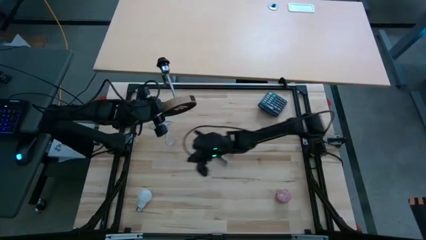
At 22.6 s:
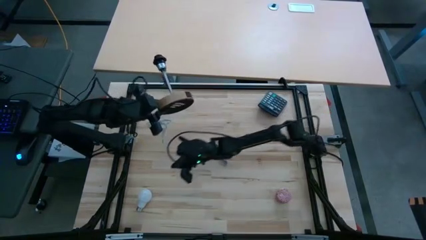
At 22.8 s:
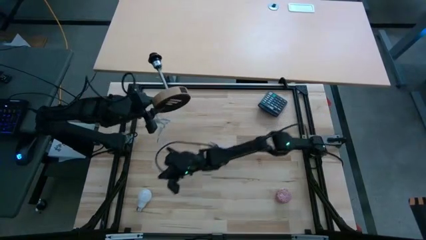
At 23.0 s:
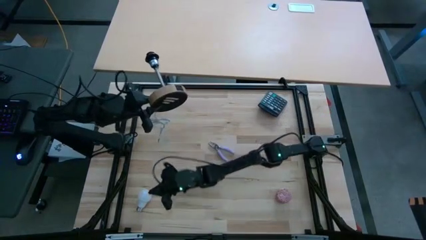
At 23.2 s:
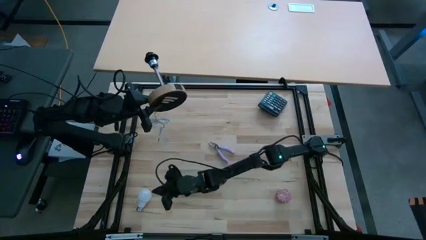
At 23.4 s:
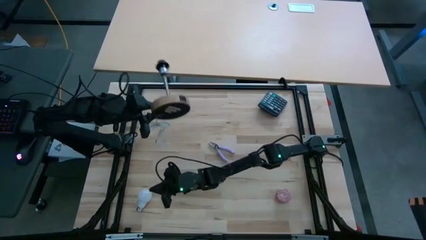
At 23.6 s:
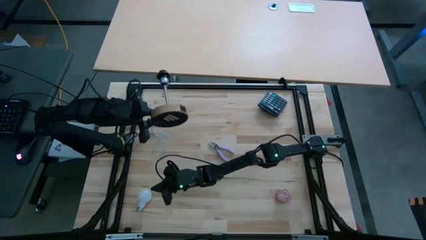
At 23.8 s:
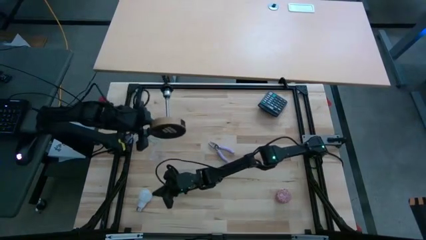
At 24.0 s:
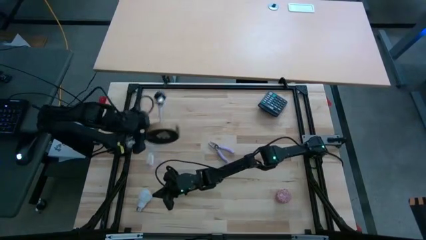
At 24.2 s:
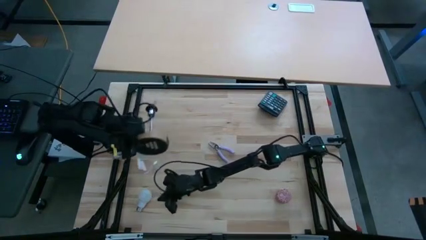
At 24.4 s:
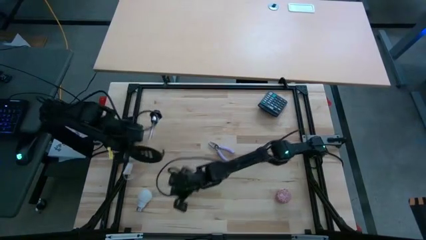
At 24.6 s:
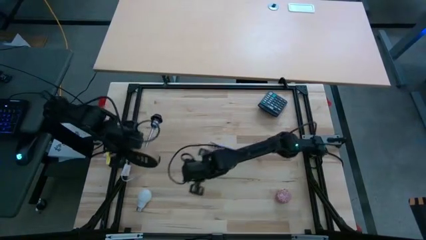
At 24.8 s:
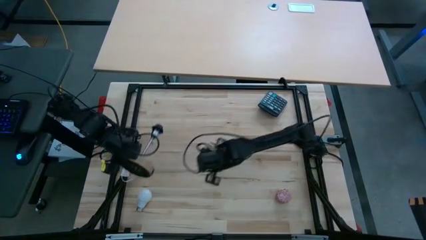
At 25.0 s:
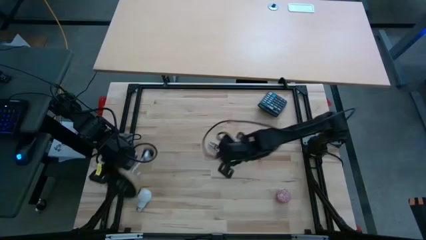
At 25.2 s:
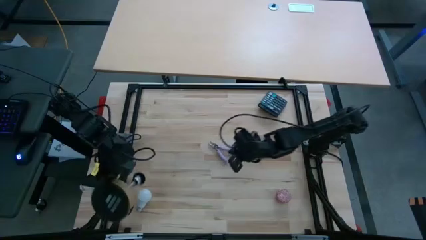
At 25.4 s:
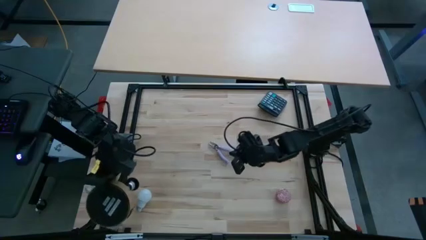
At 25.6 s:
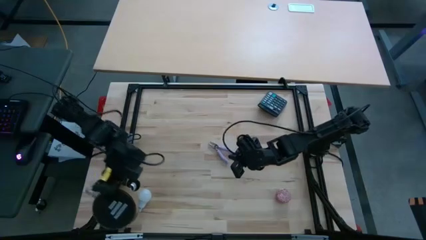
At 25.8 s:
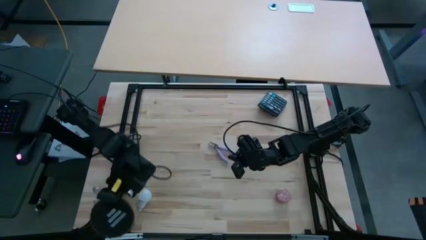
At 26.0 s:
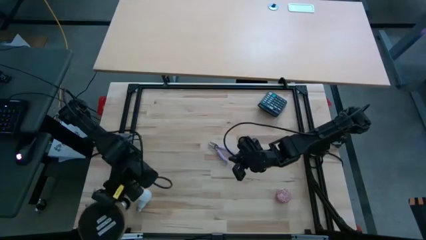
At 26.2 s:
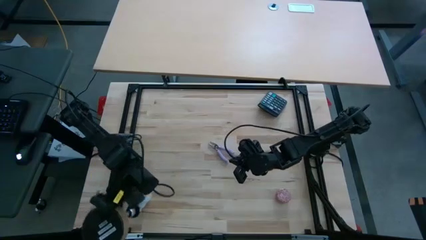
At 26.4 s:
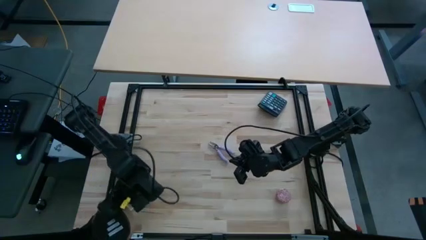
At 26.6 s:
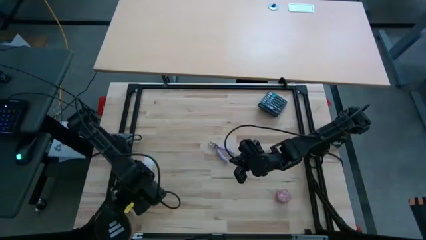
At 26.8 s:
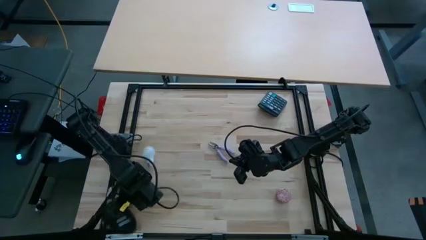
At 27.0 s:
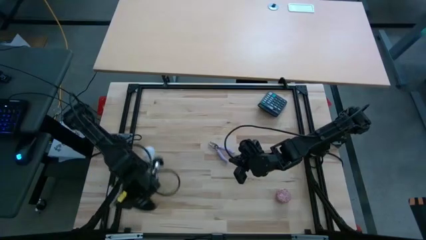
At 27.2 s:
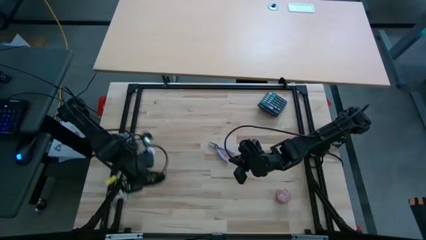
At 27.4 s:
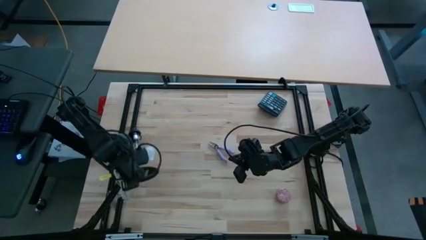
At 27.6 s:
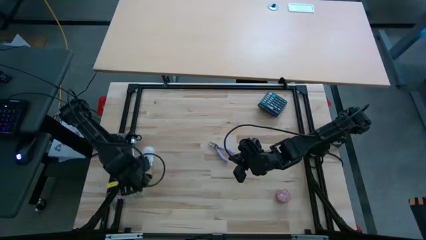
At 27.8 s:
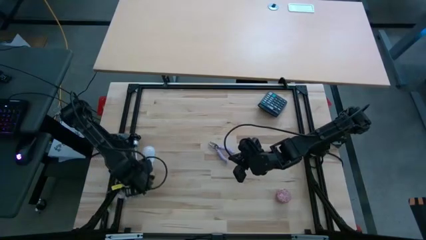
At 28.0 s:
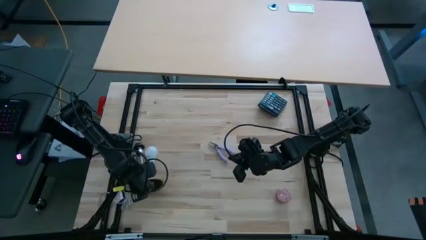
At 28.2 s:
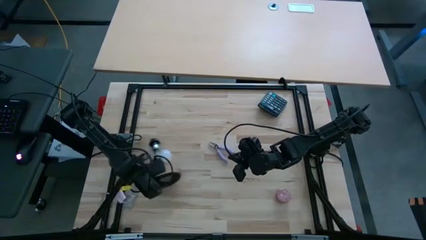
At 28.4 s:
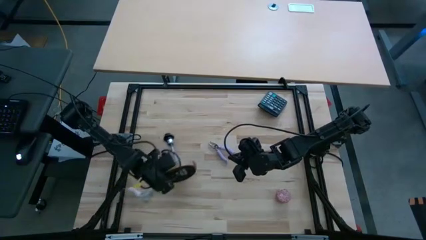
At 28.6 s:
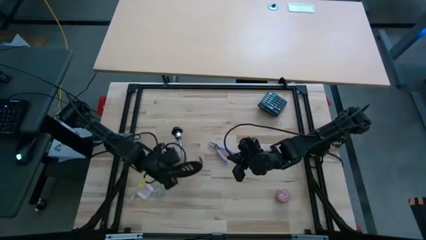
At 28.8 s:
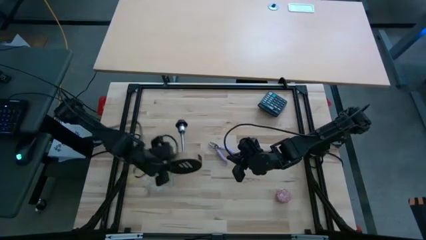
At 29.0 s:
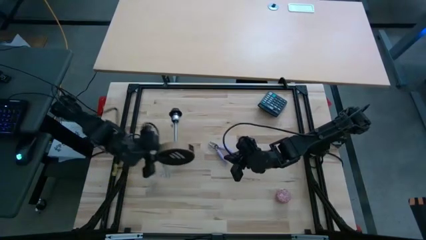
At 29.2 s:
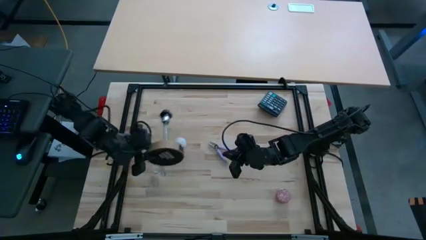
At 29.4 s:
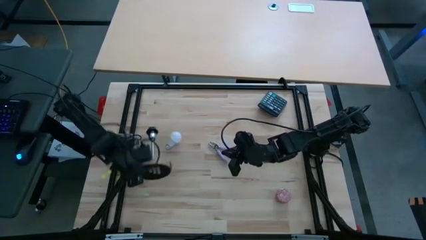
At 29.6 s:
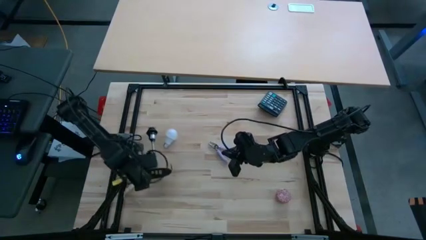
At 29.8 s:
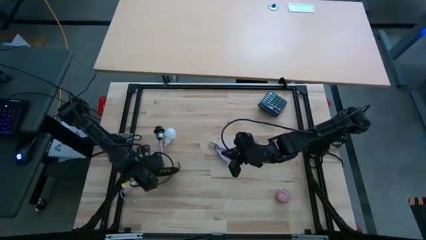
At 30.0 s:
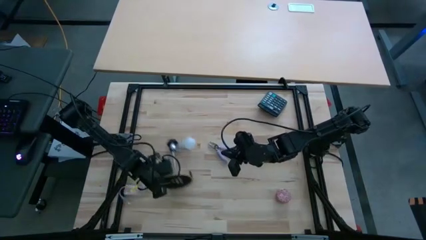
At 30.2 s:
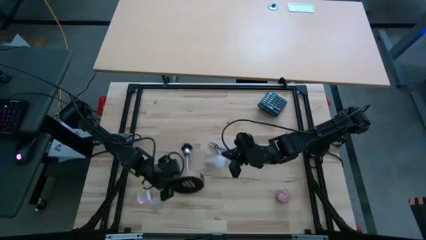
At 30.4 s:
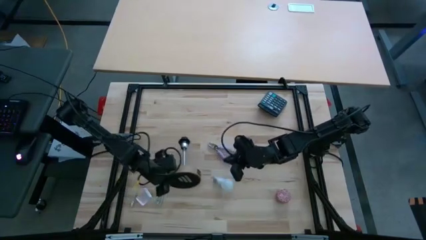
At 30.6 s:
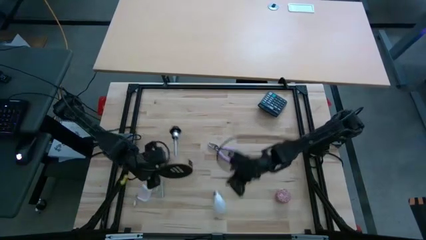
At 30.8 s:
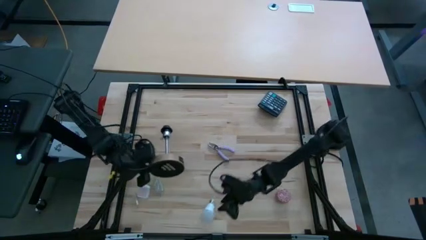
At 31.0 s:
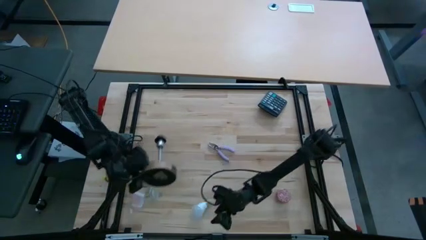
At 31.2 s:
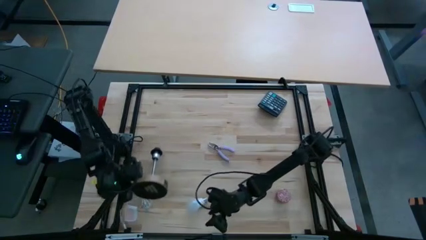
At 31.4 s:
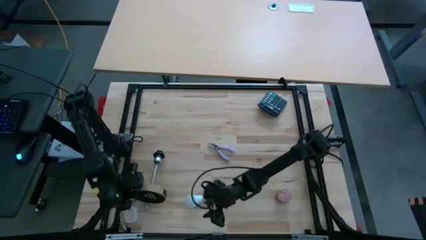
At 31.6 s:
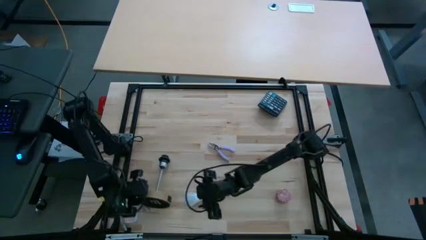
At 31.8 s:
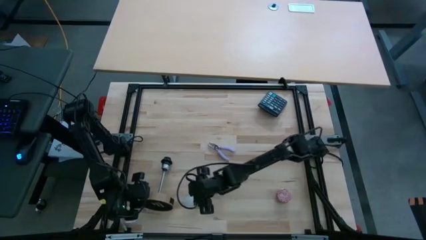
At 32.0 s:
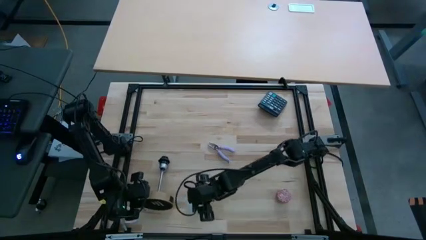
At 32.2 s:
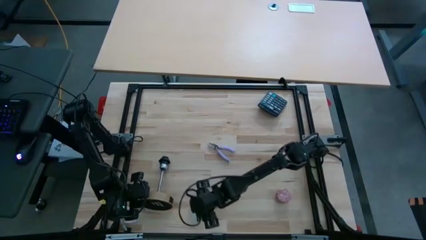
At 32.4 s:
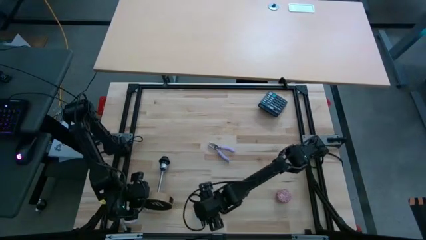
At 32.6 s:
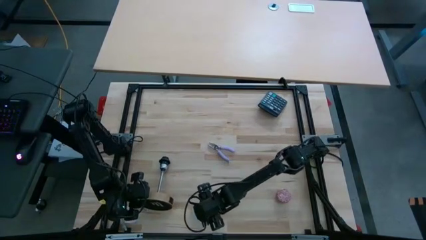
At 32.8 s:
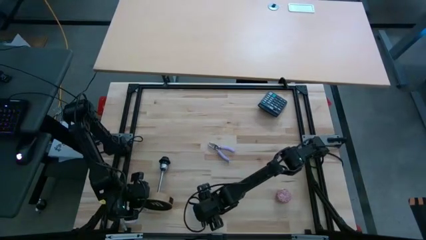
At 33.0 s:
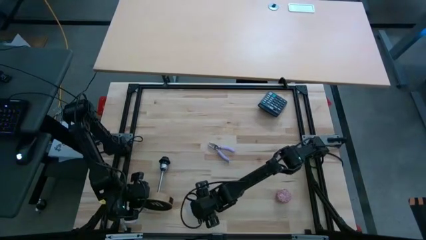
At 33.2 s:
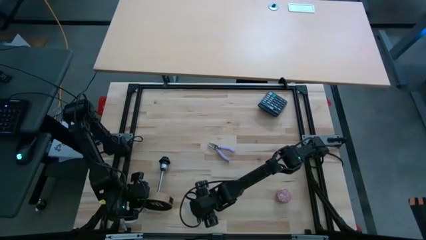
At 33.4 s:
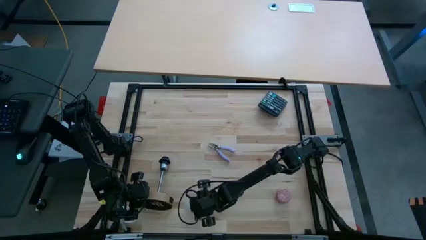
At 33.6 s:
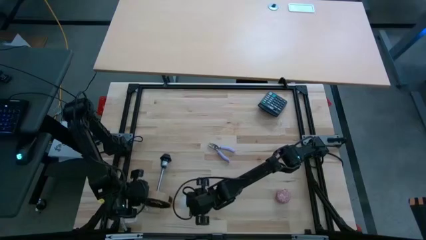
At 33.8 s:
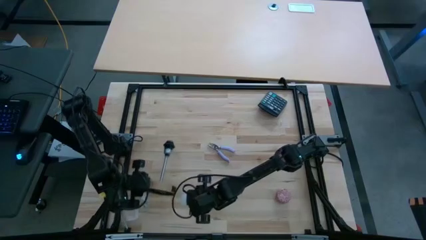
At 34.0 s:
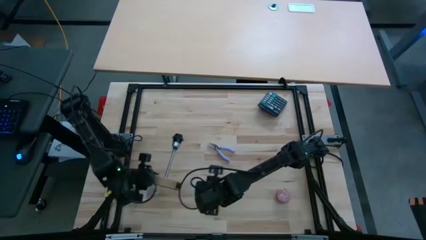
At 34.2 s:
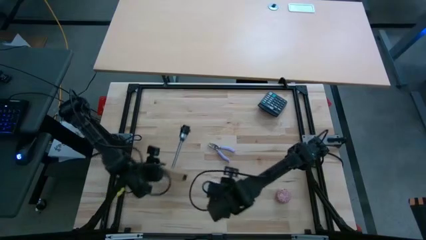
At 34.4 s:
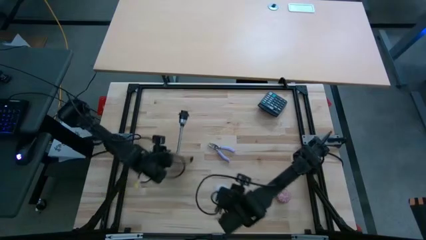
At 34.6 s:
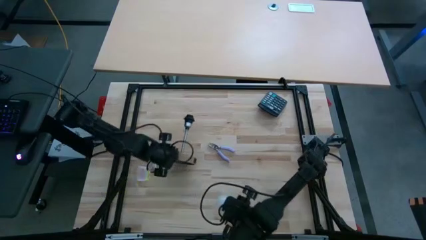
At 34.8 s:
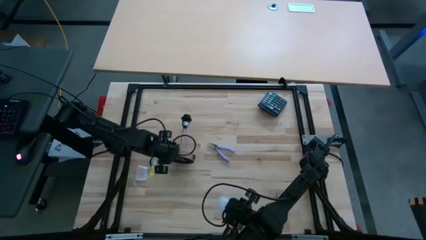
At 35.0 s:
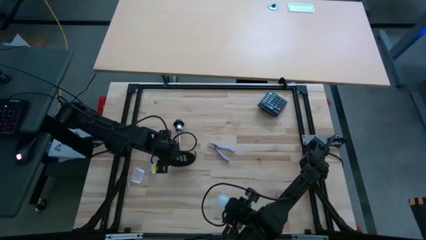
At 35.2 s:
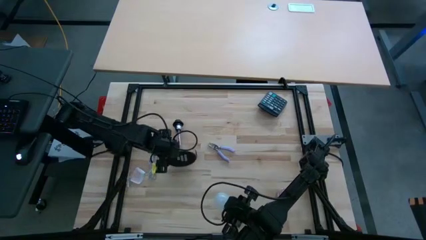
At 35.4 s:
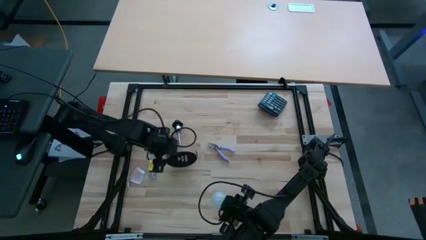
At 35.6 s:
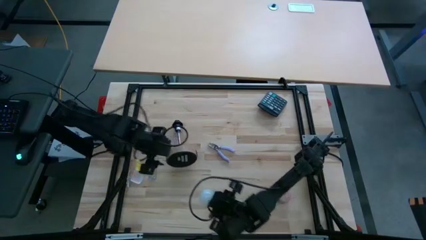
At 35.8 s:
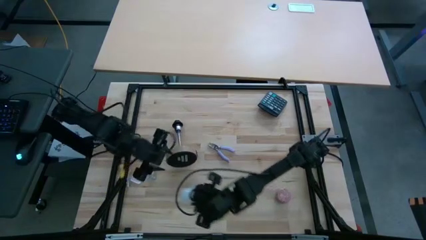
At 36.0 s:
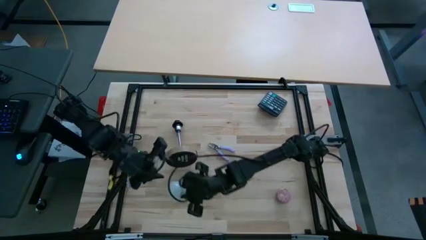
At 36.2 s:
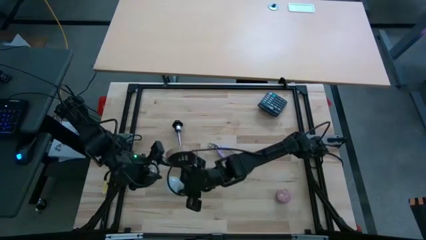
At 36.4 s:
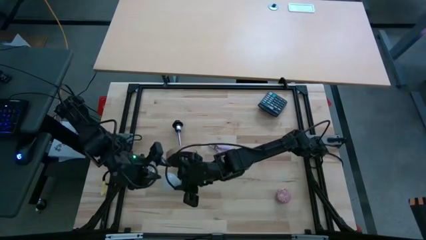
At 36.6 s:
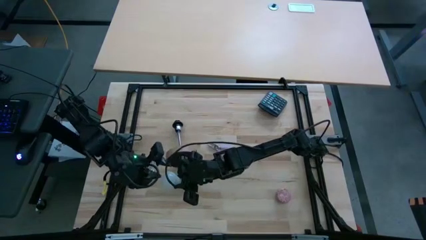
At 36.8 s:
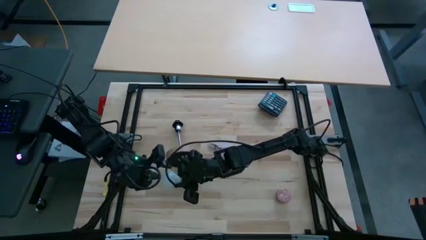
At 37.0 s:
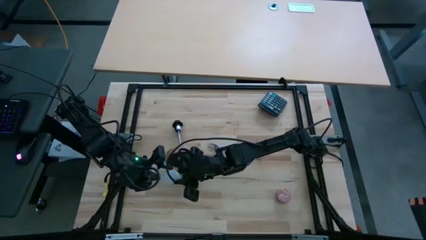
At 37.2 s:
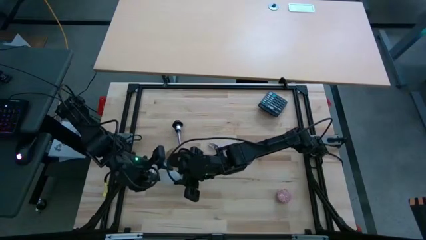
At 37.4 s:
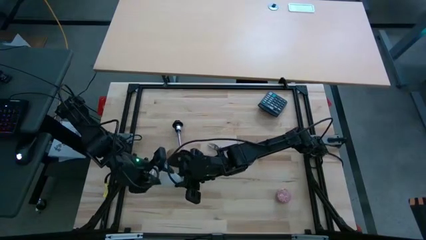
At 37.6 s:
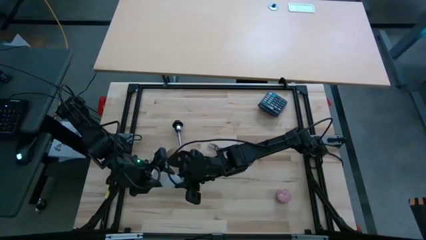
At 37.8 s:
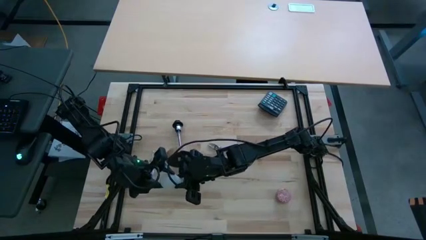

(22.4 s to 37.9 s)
Task: Screw lightbulb
Insert the light bulb into the lamp socket

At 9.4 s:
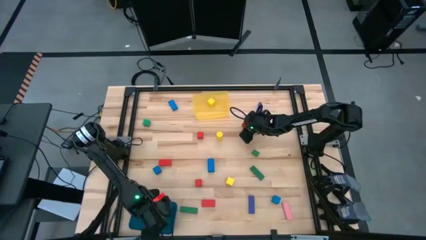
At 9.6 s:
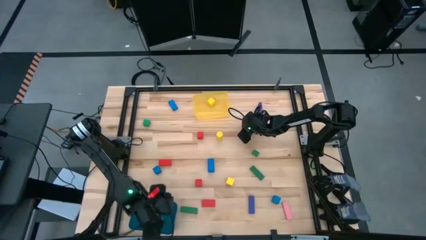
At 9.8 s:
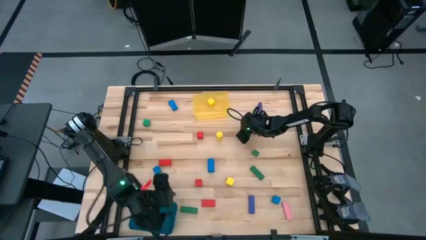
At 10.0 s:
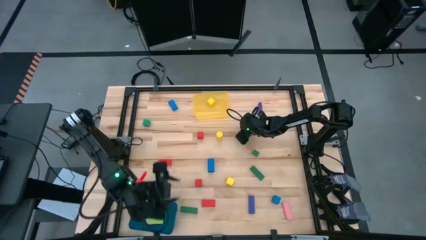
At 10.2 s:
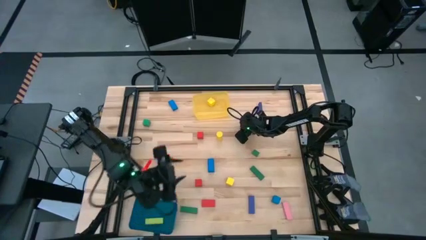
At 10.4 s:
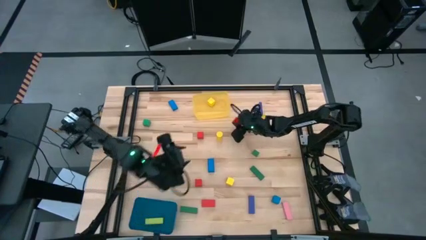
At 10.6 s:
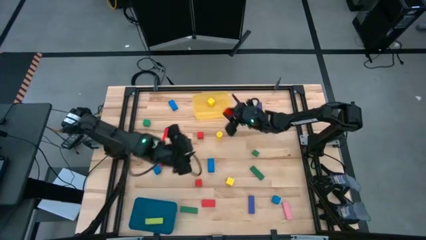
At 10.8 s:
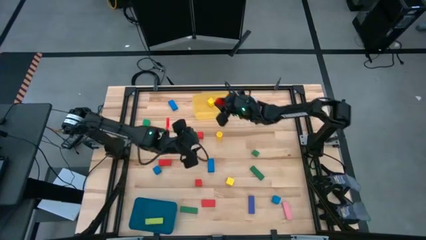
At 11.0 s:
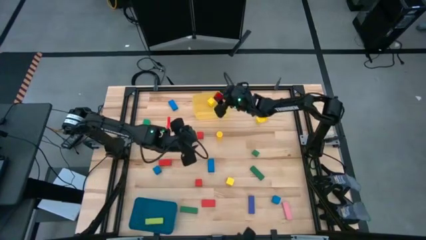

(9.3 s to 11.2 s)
Task: Sort blocks by size
Put the red game piece into the yellow bin
